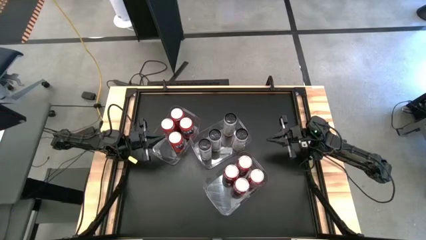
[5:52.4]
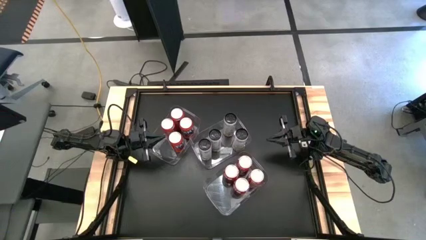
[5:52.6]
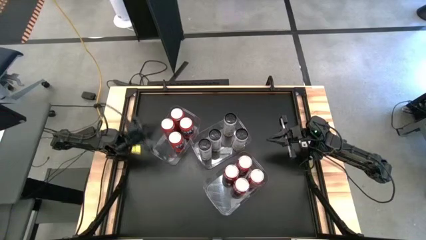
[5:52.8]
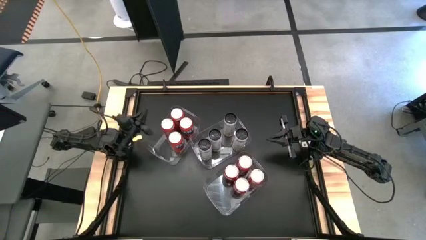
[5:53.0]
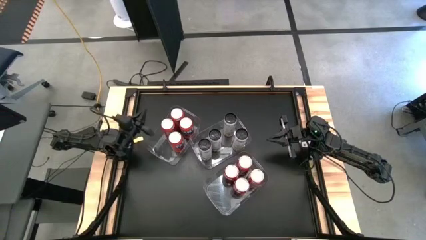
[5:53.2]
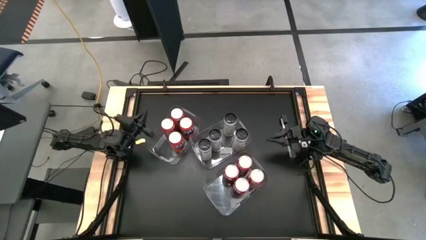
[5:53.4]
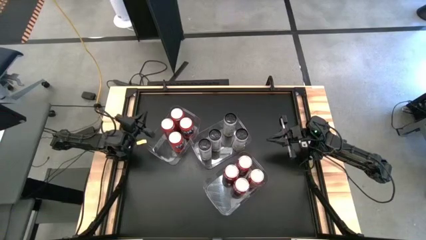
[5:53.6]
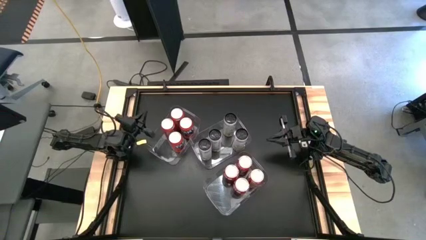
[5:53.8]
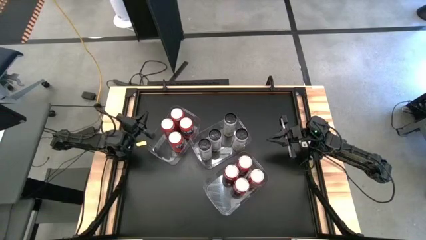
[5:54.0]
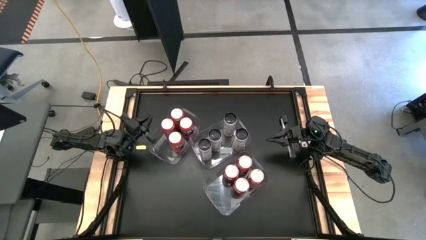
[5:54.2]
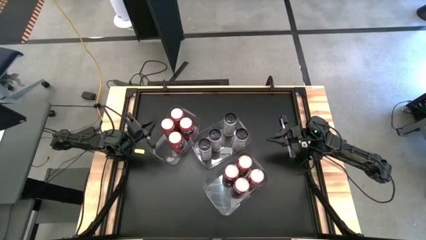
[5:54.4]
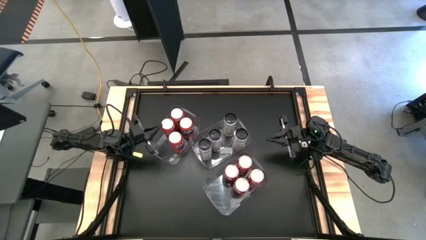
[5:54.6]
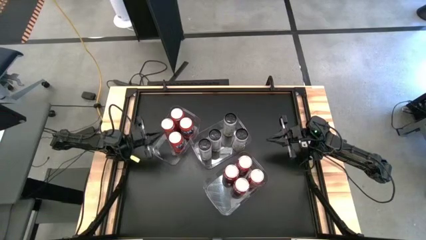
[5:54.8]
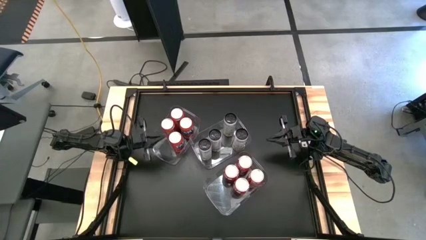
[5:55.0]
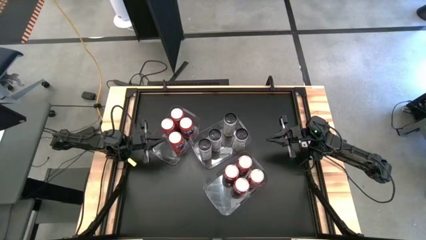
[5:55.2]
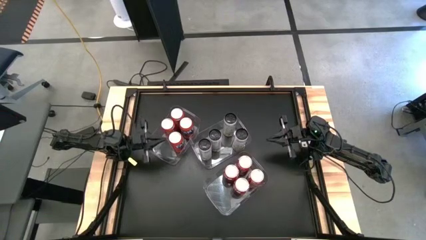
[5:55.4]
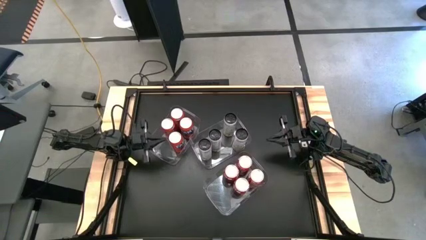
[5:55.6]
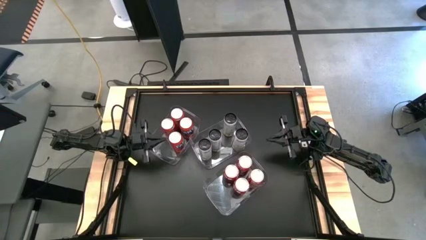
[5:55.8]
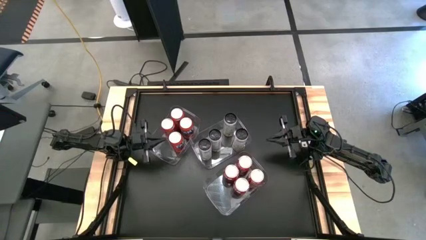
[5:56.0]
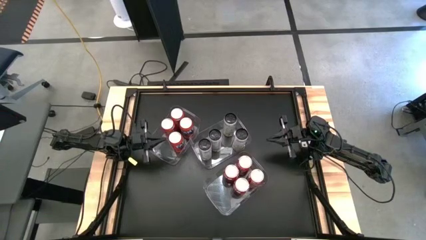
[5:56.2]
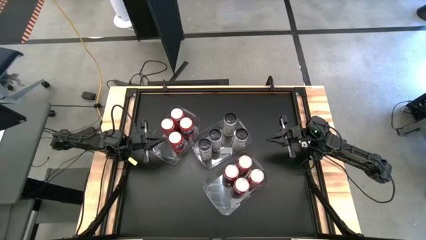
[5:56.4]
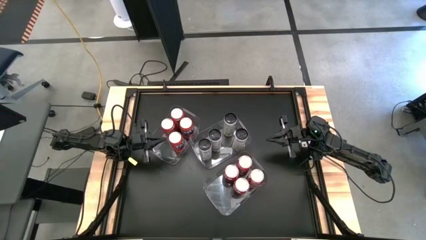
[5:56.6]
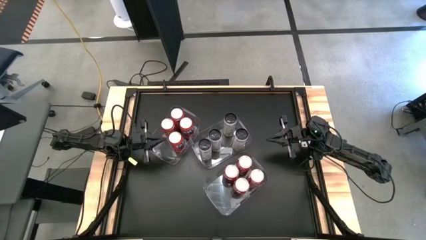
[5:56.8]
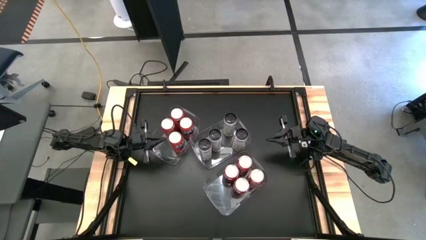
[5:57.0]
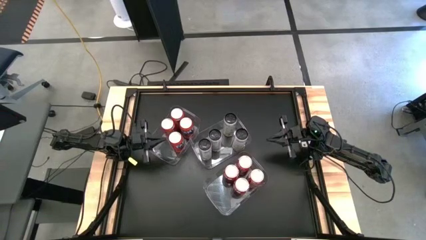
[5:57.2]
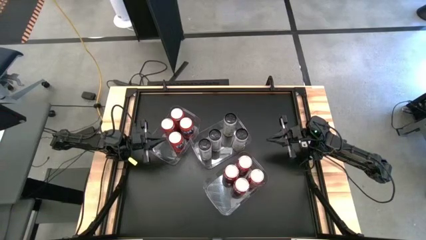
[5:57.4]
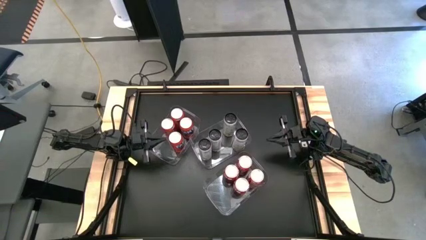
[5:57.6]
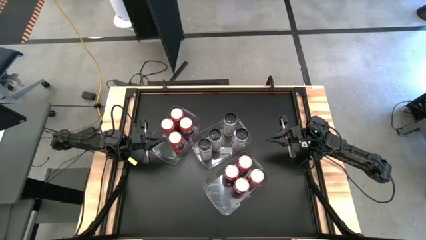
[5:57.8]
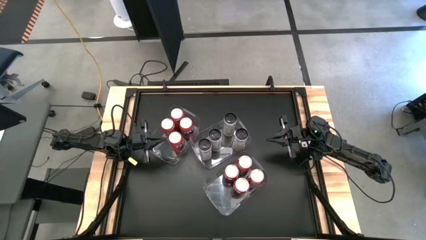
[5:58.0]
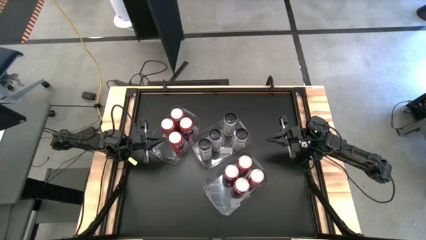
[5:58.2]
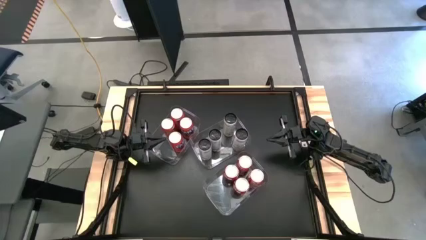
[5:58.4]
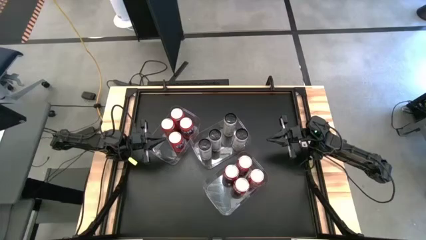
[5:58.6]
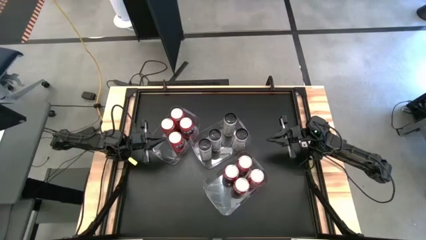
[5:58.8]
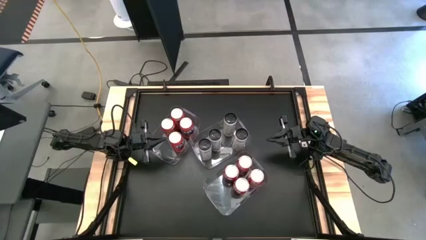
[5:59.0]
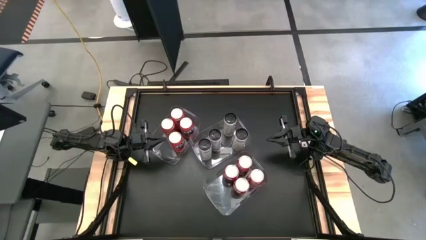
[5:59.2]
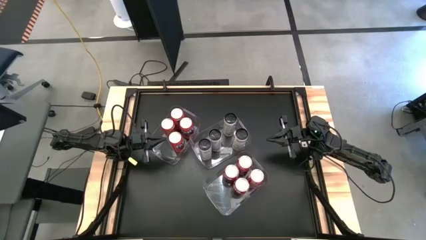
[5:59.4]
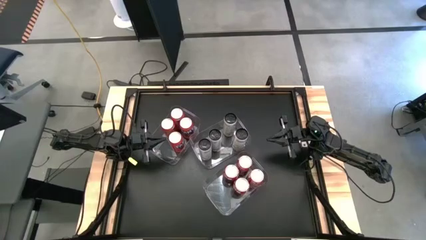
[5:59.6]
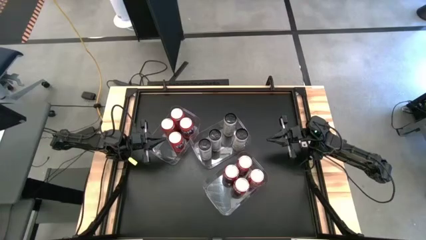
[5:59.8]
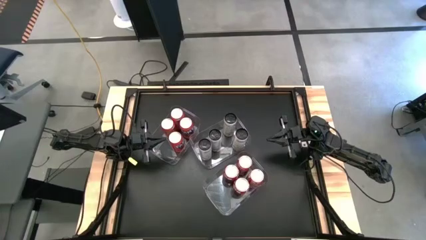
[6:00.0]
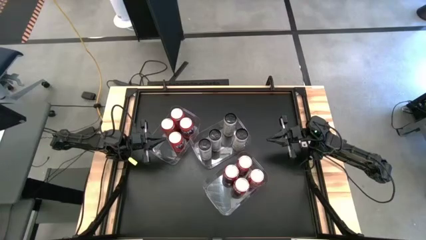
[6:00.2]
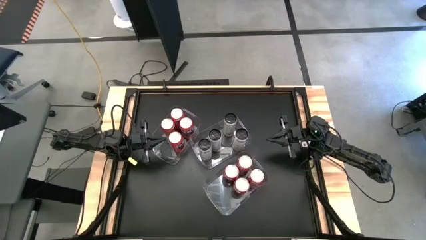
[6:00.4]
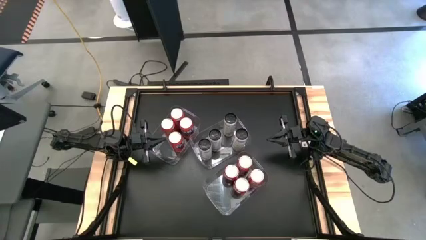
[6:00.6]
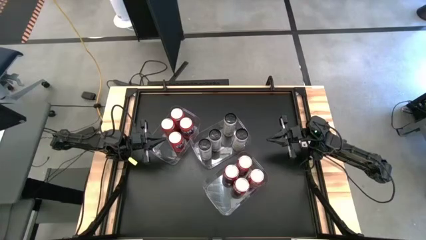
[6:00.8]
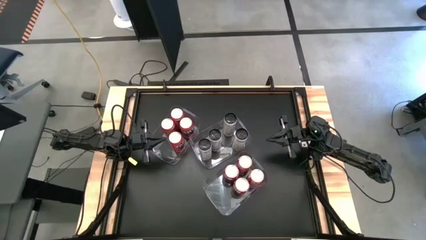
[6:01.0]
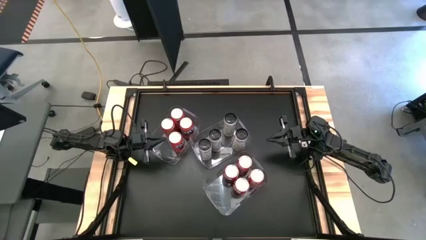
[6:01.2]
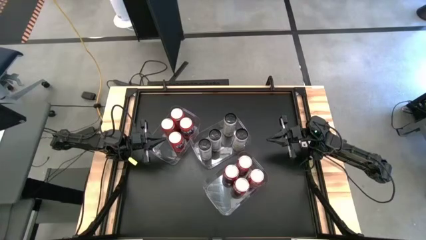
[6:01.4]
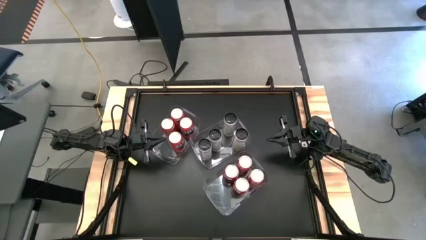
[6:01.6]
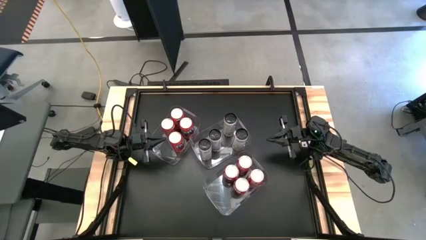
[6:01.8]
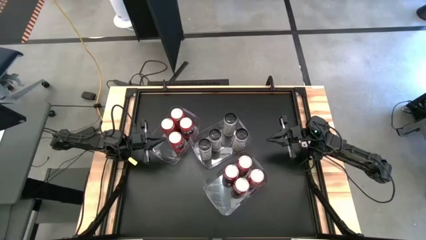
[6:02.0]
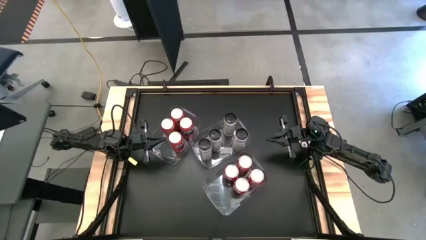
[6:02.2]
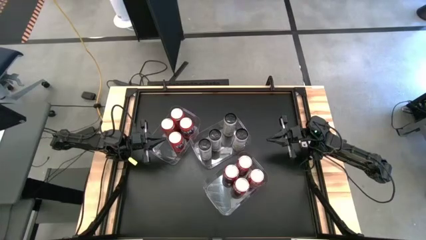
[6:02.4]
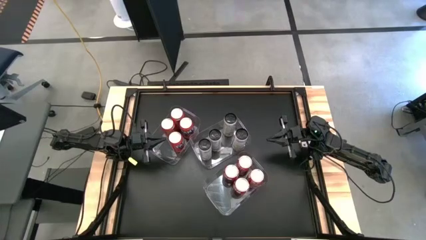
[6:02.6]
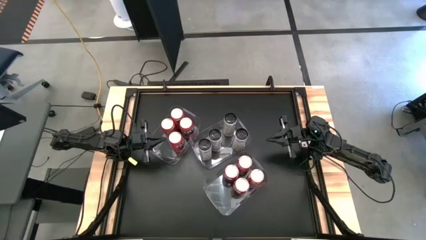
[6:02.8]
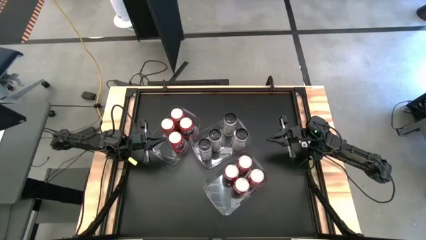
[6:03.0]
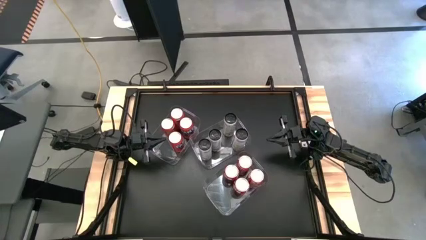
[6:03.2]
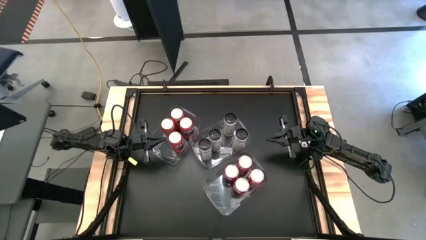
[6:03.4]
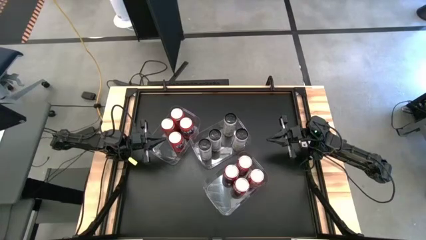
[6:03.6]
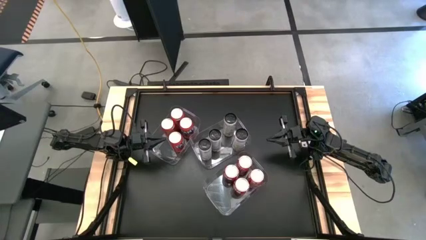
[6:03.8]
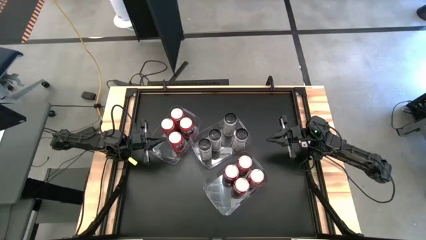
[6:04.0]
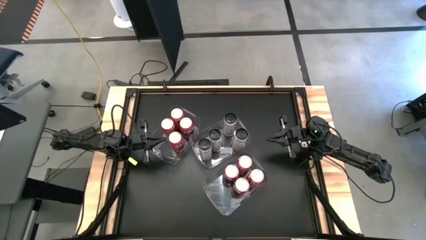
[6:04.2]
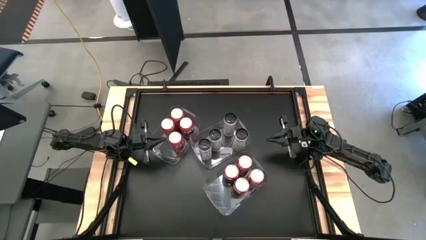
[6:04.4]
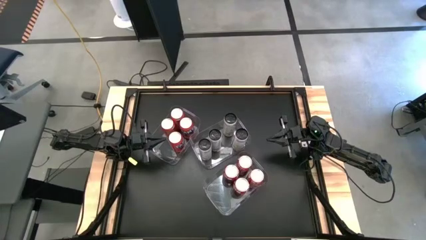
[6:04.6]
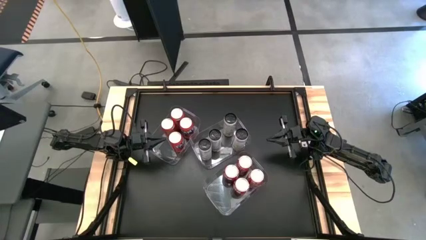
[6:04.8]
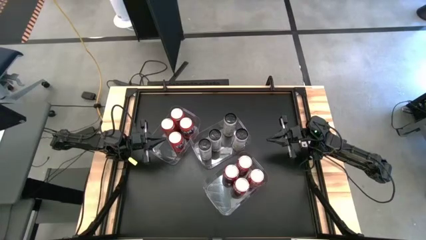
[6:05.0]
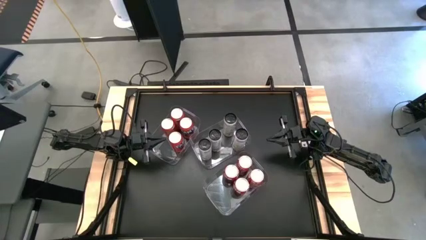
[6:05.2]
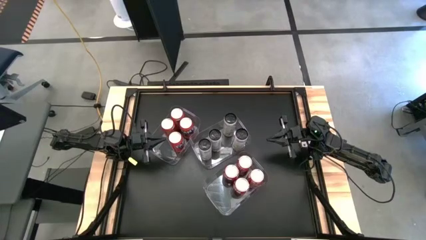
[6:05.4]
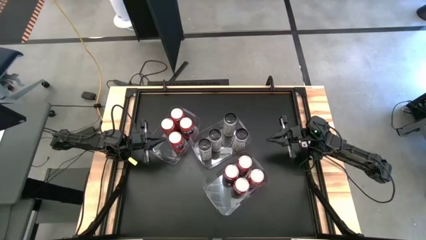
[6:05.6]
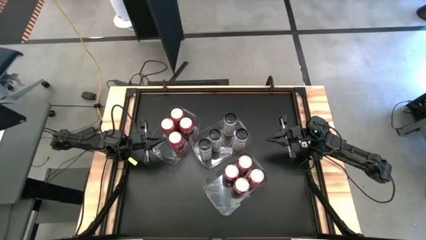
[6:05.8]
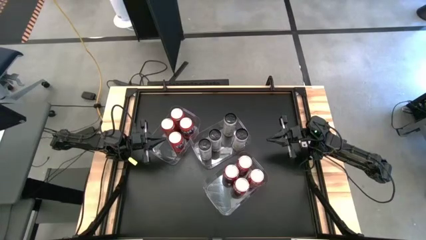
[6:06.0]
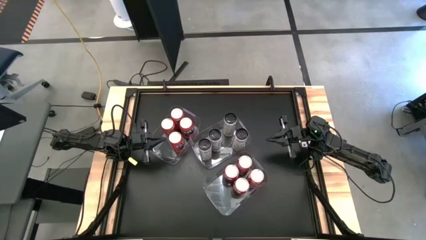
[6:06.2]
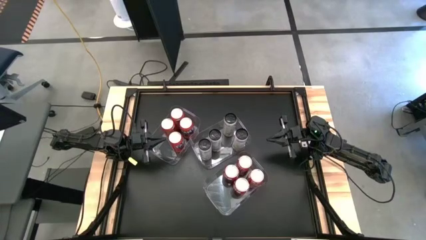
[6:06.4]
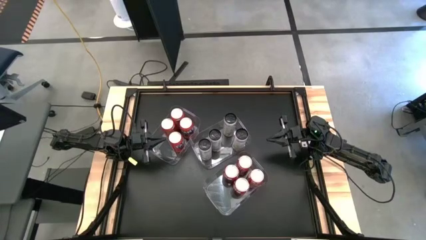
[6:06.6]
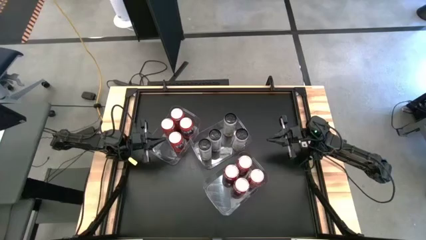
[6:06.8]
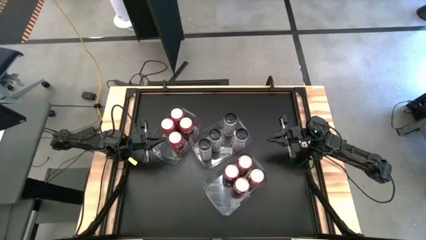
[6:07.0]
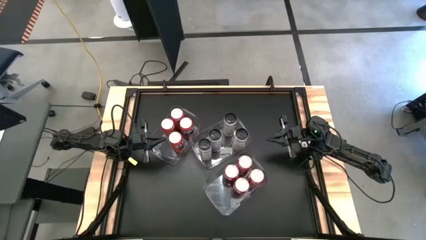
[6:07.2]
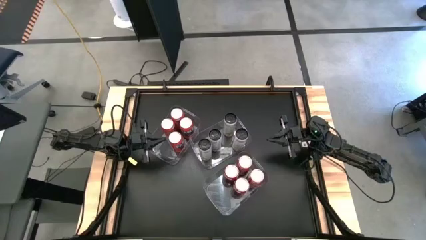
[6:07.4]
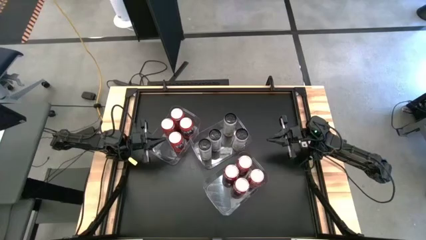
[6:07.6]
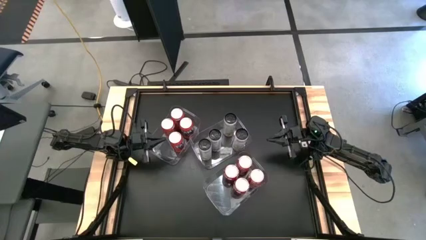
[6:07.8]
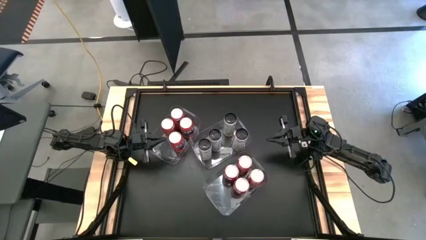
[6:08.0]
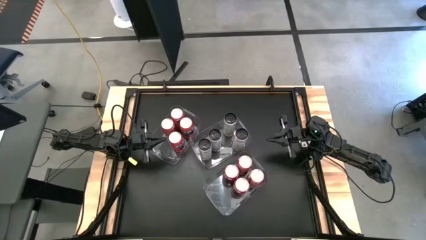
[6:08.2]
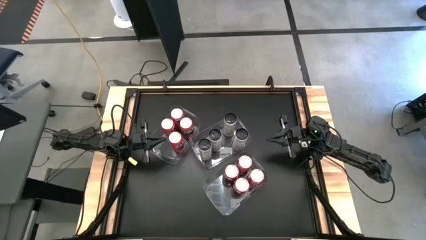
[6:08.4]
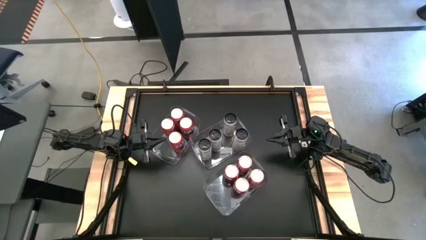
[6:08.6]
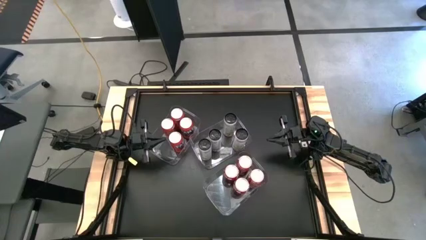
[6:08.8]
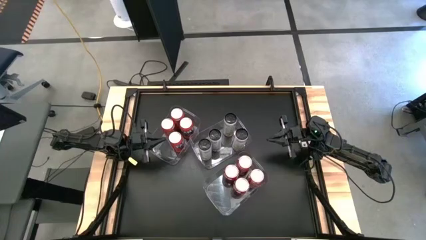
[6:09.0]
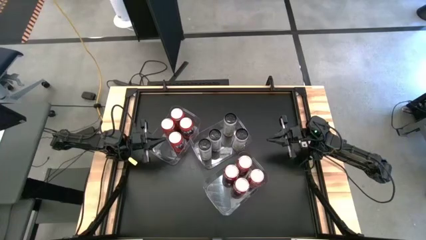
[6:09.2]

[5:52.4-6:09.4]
Task: Sort soda cans
Return to Home Position
